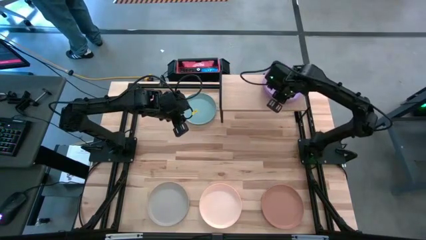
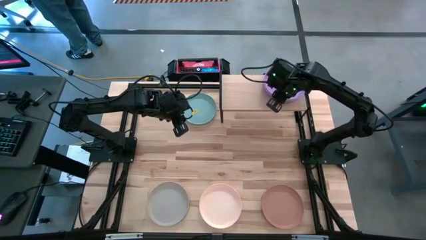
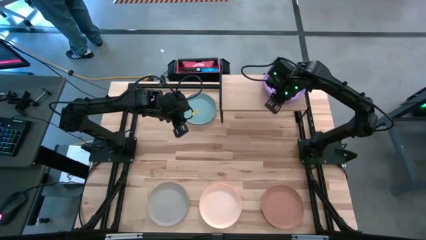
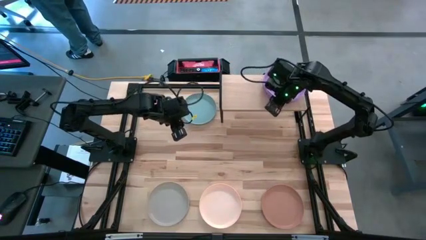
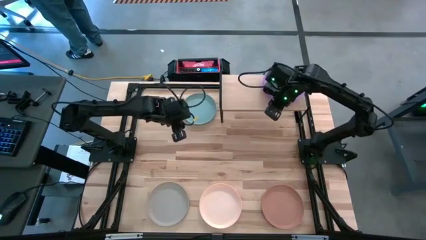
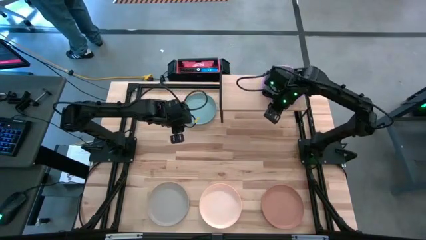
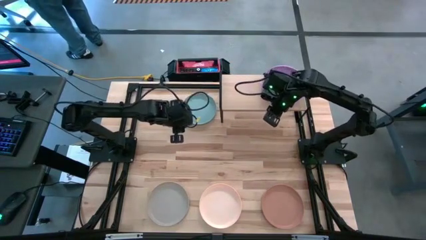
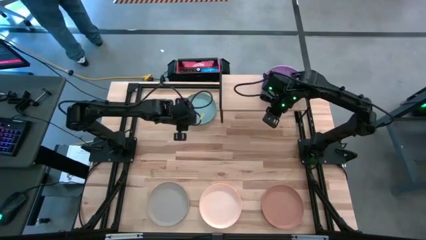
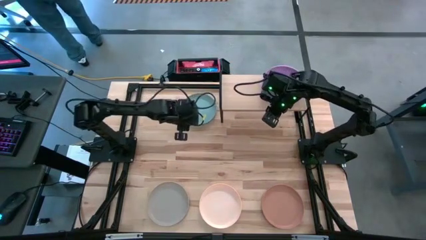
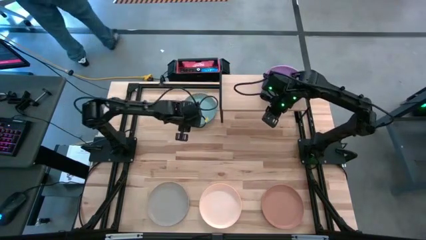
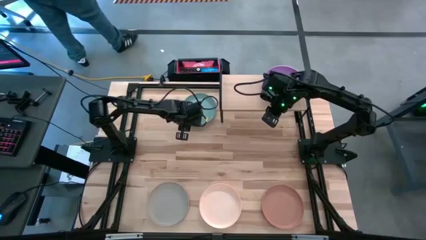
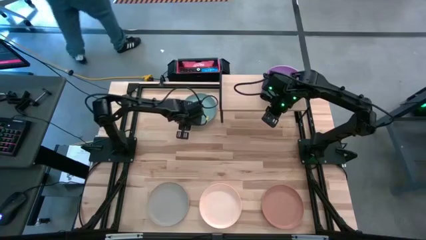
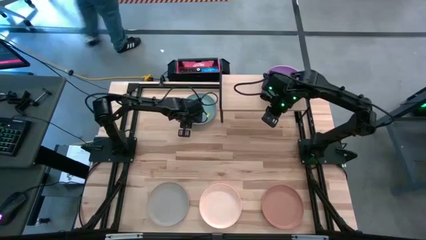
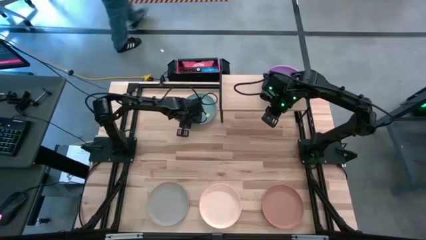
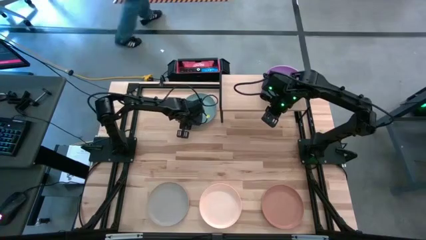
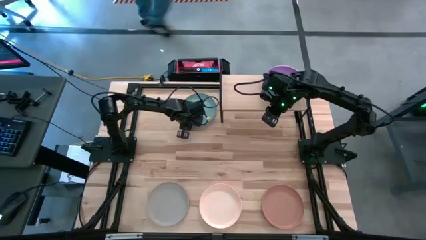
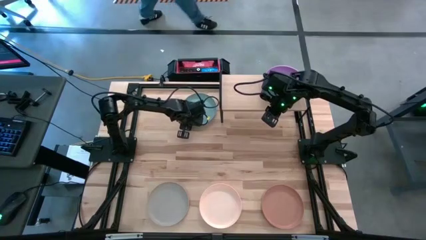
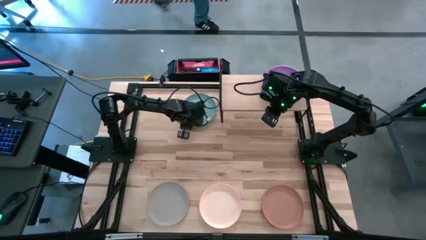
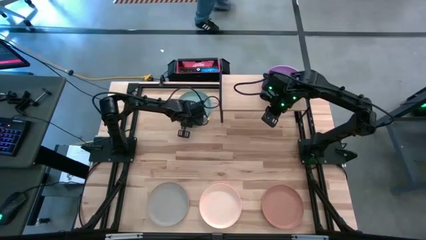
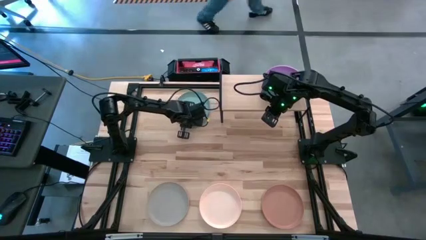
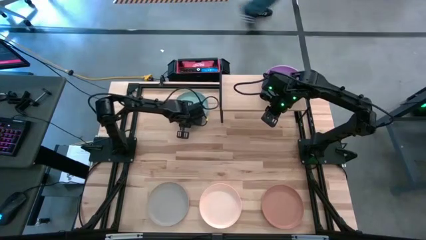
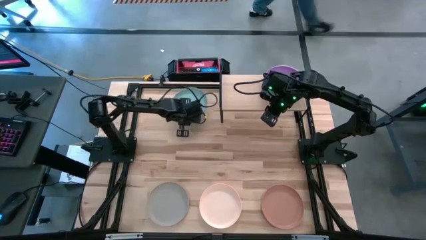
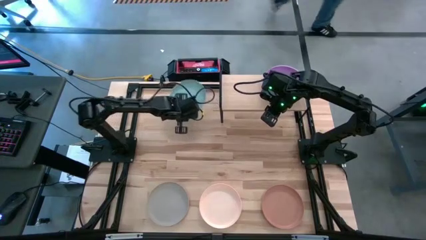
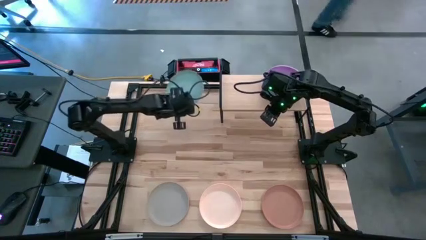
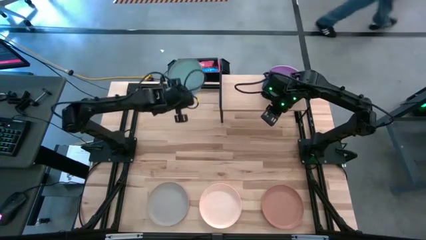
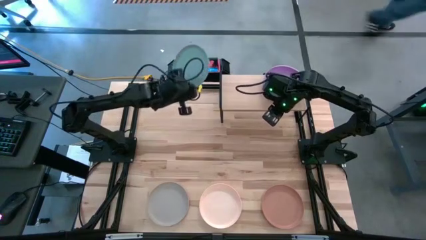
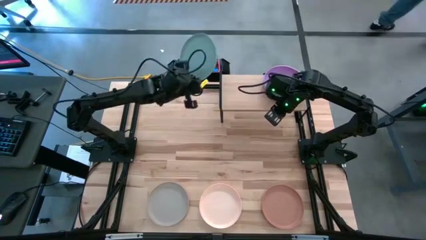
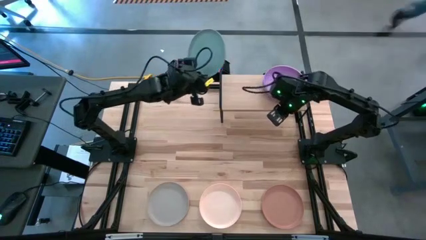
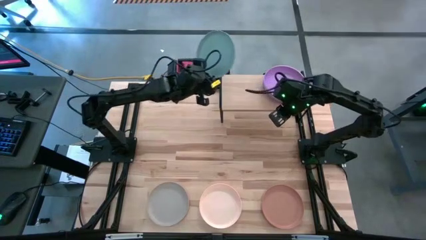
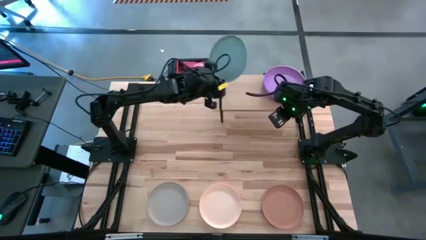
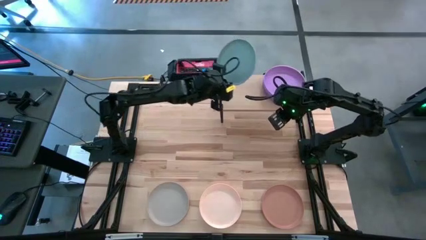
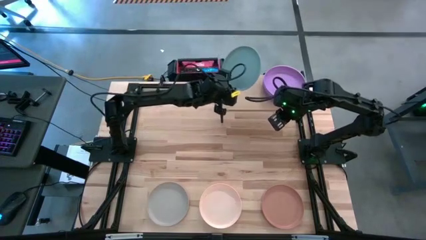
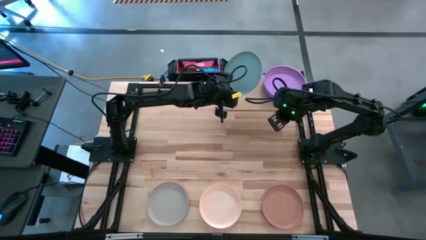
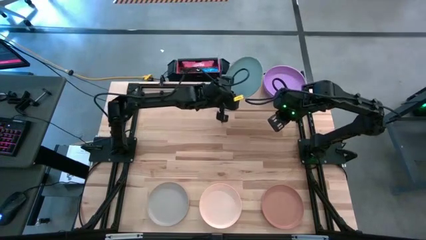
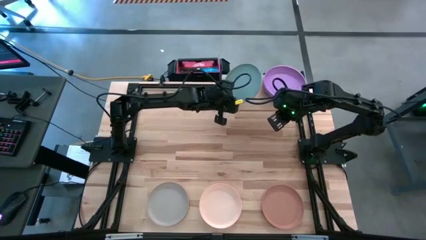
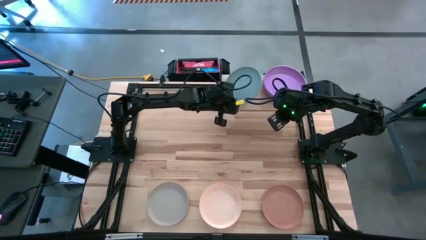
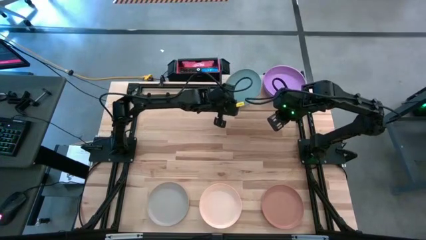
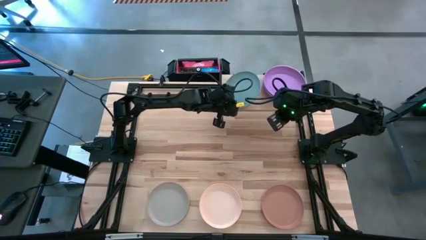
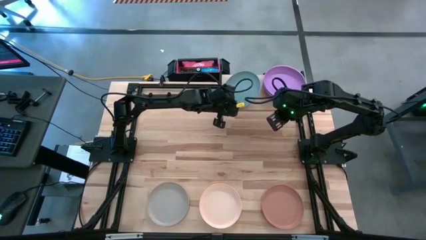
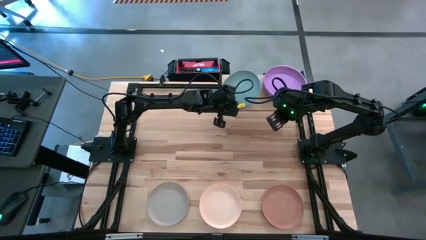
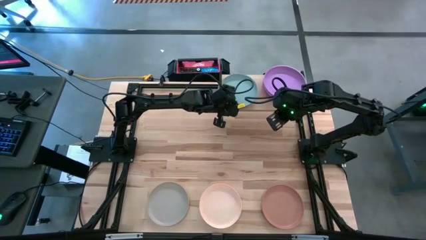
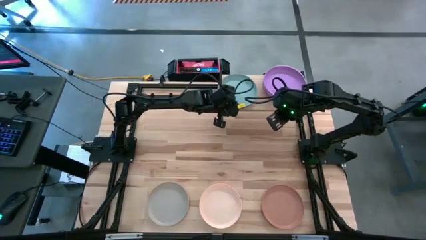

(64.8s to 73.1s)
Task: Place and stack plates onto a shelf
Put the light blue plate on the shelf

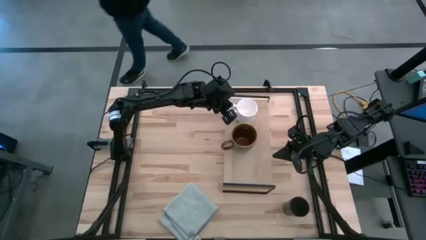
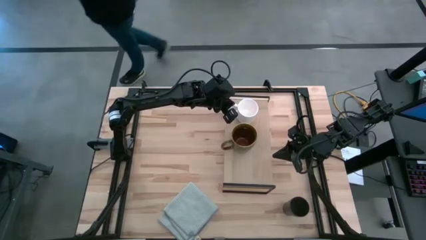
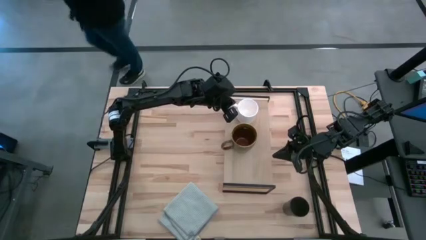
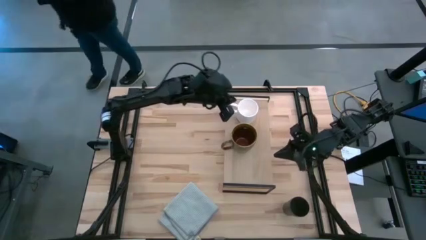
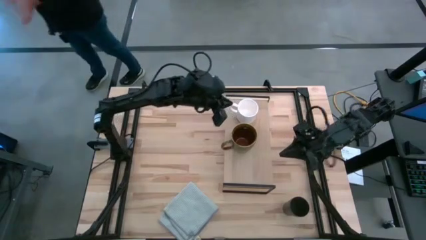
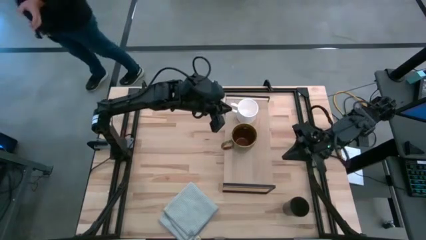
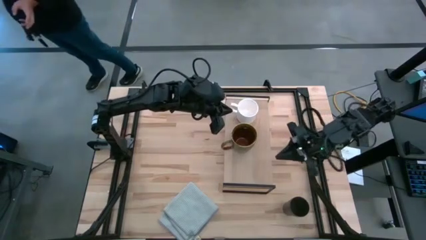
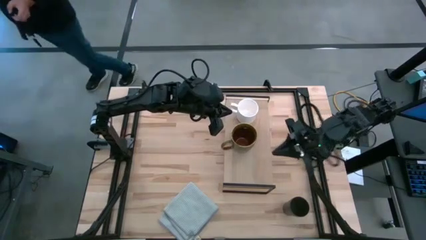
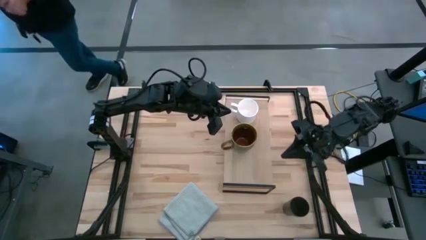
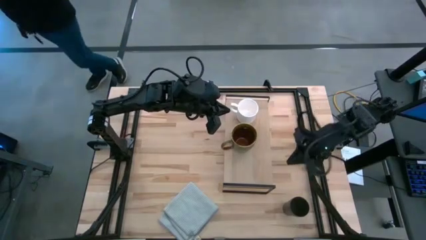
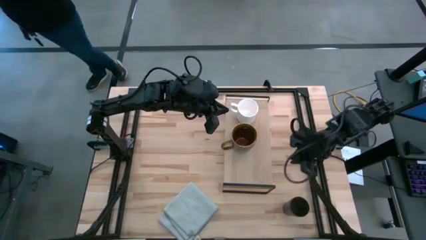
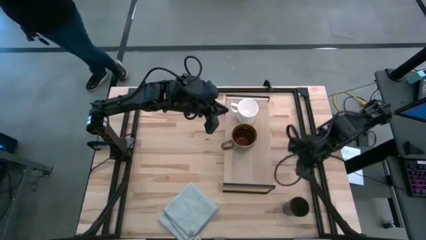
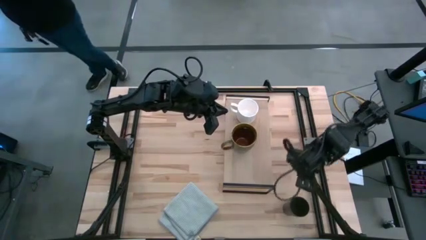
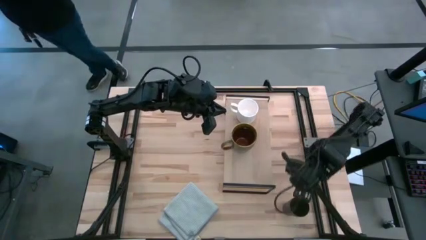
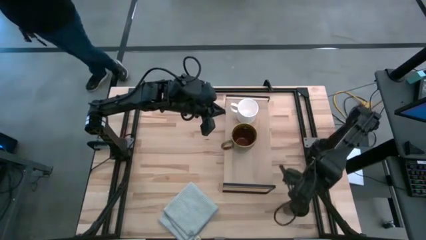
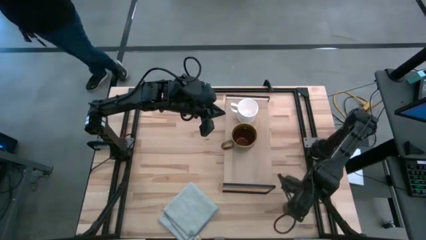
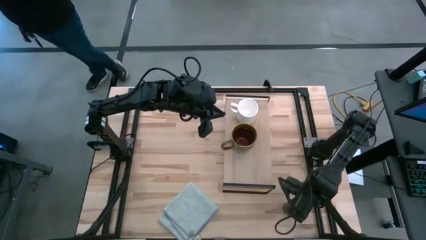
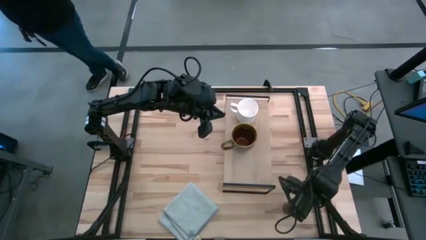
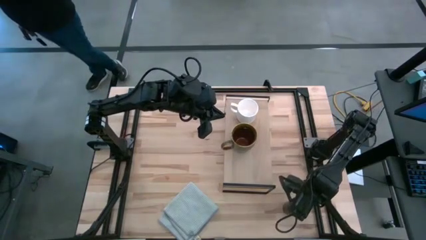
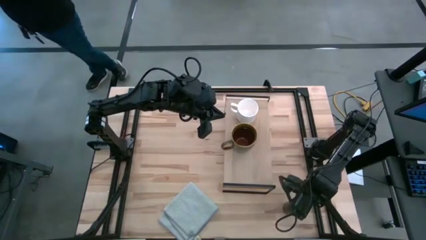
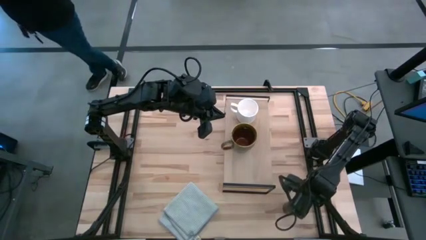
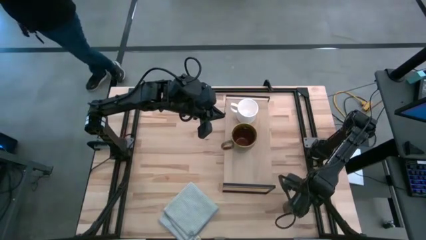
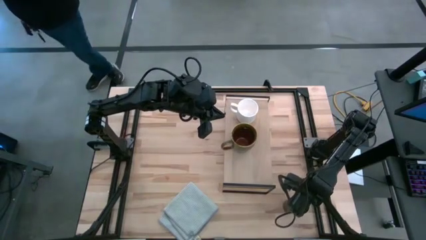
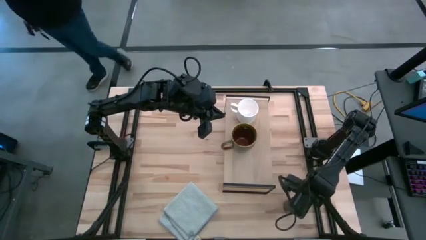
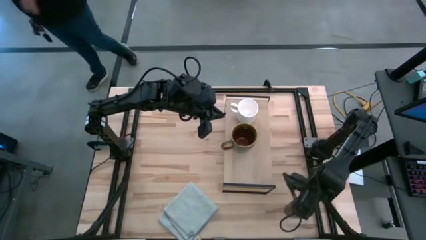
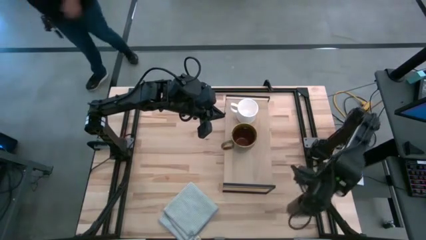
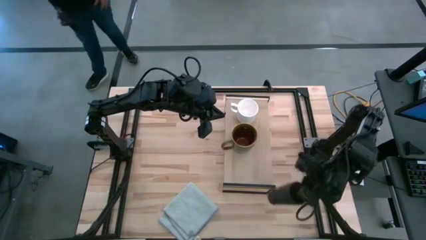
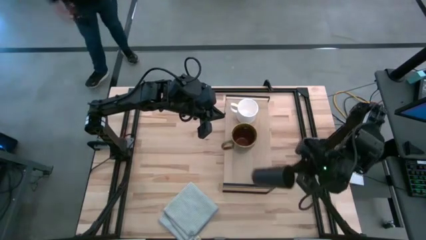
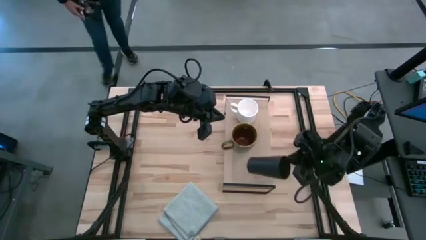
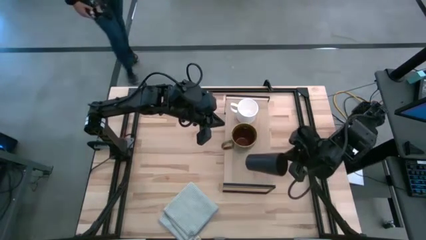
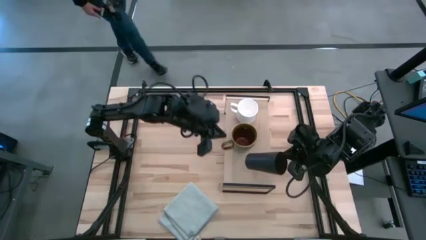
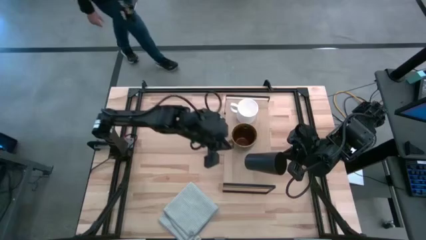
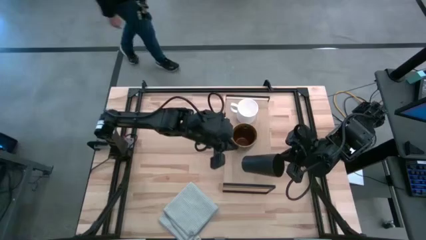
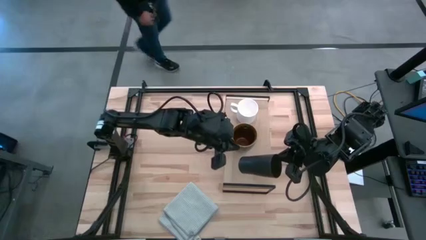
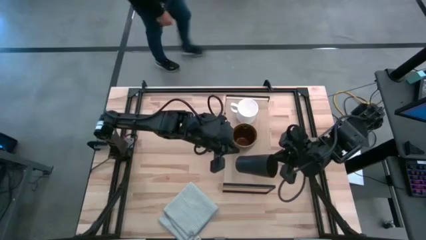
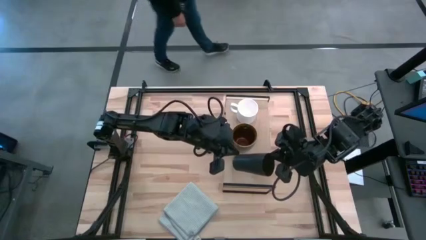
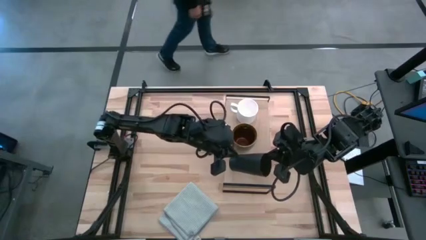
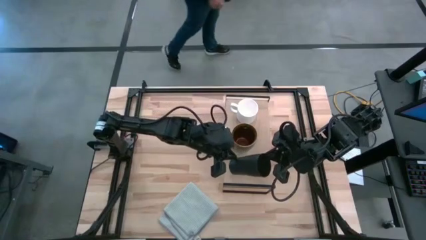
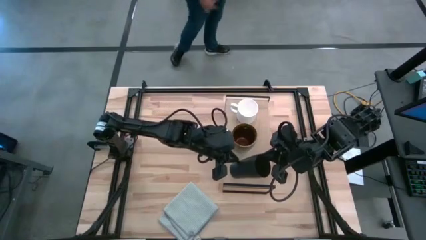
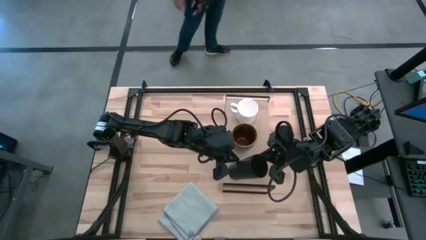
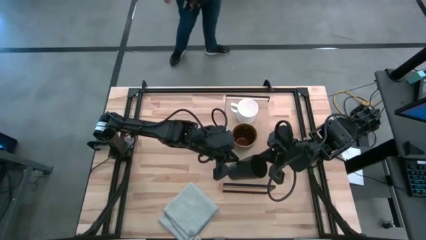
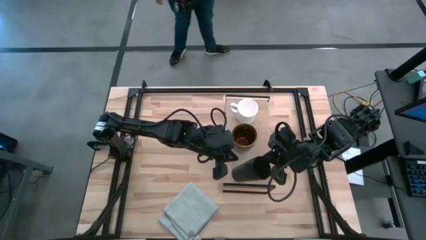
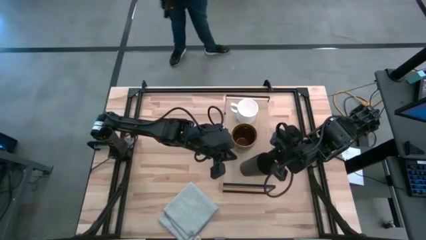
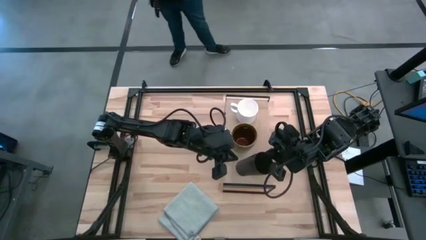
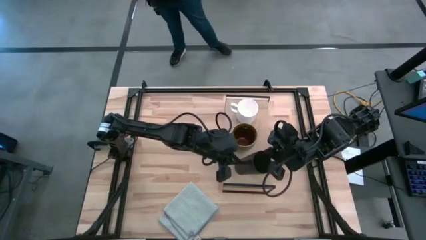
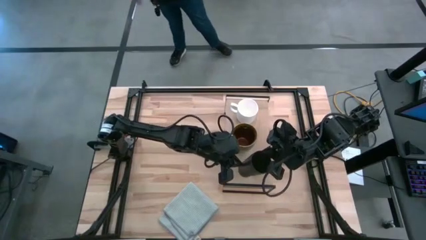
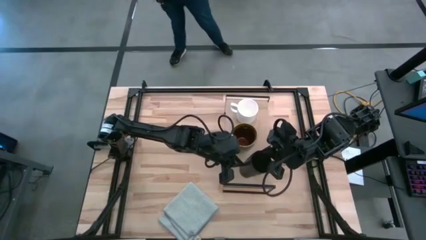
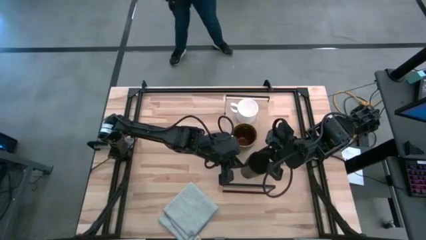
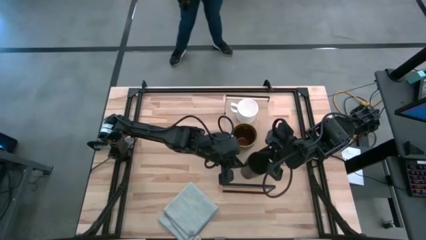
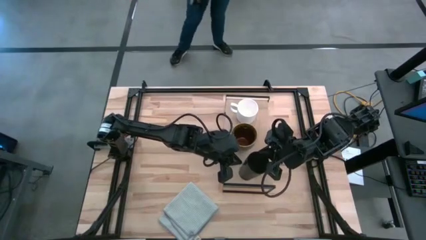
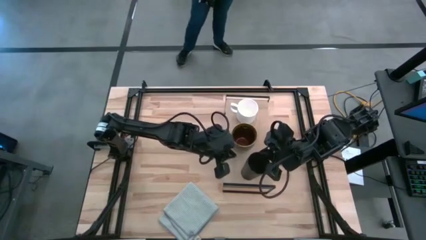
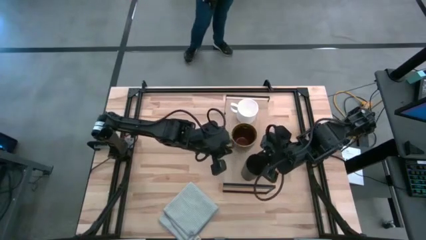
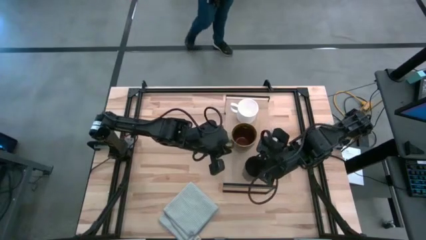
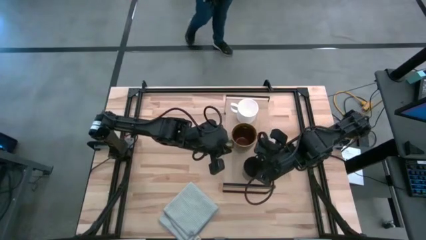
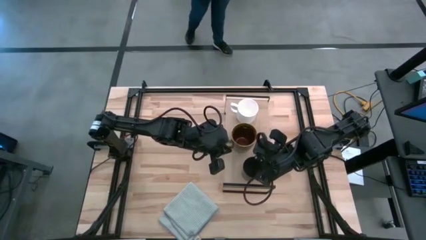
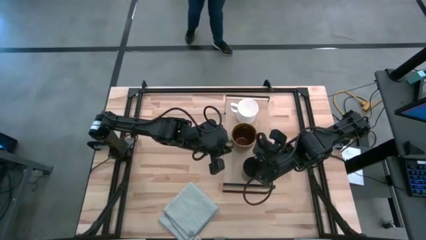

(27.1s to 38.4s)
Task: Stack small to large cups/mugs on shelf
Put the black cup on the shelf
